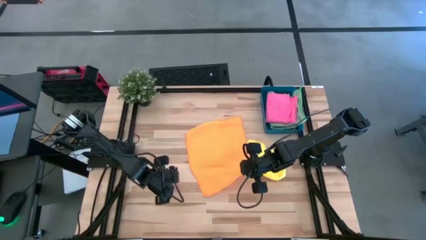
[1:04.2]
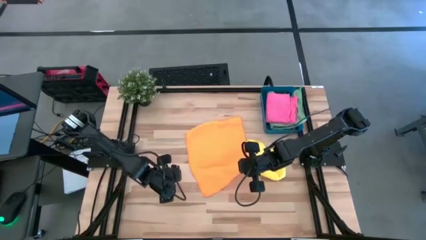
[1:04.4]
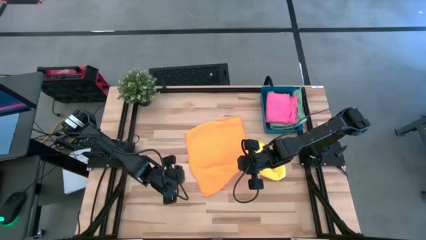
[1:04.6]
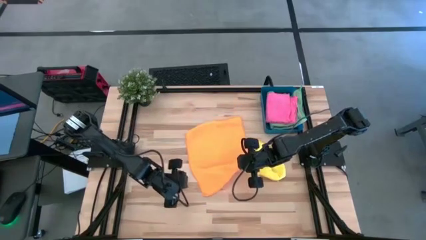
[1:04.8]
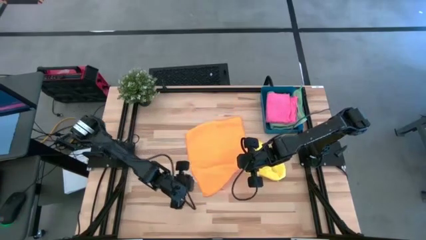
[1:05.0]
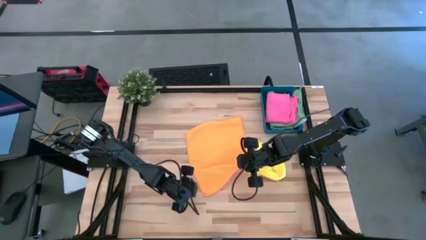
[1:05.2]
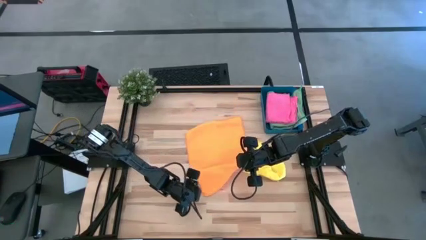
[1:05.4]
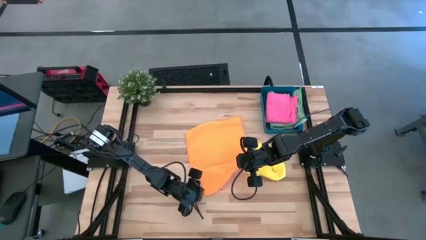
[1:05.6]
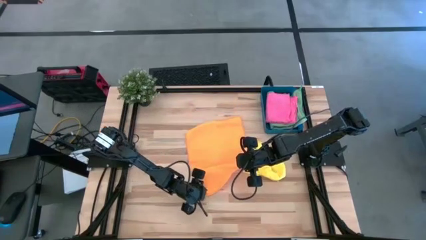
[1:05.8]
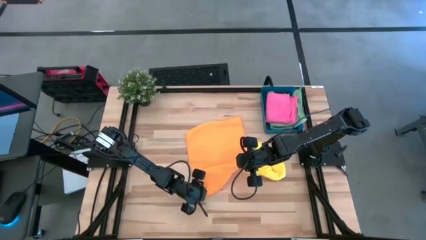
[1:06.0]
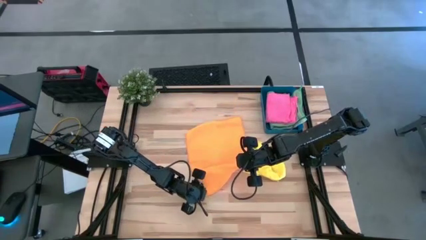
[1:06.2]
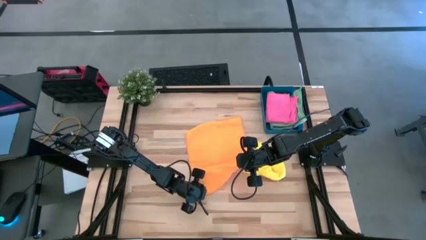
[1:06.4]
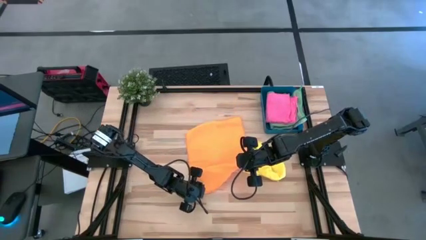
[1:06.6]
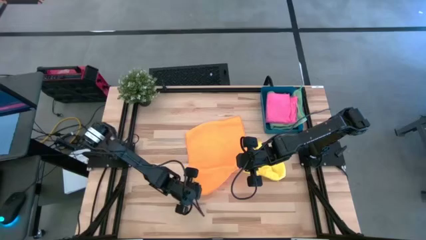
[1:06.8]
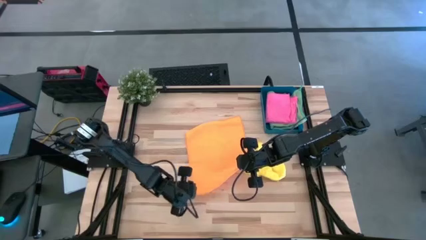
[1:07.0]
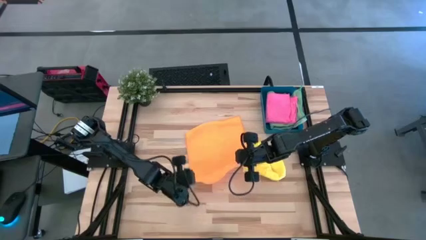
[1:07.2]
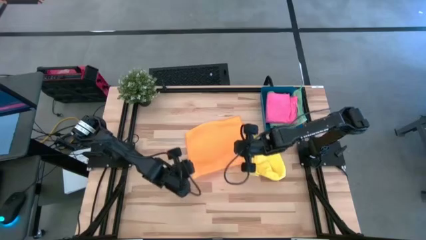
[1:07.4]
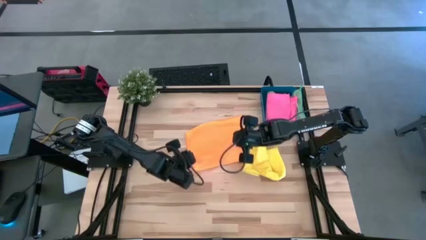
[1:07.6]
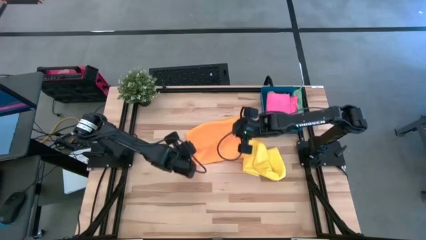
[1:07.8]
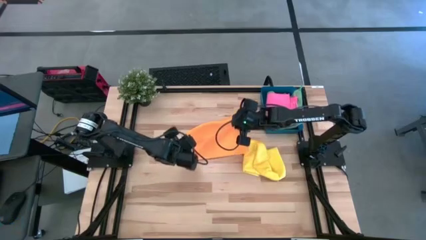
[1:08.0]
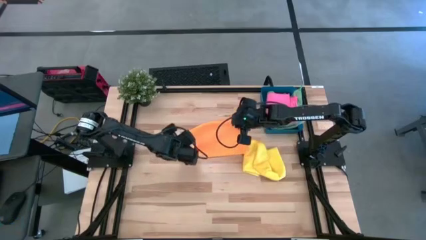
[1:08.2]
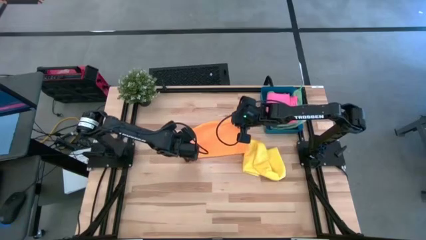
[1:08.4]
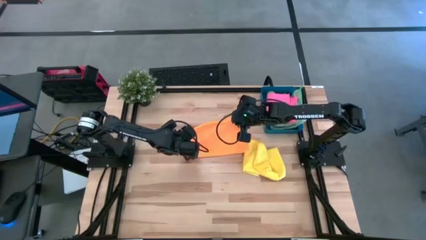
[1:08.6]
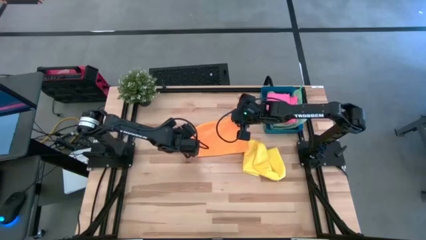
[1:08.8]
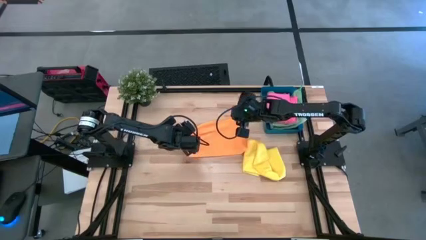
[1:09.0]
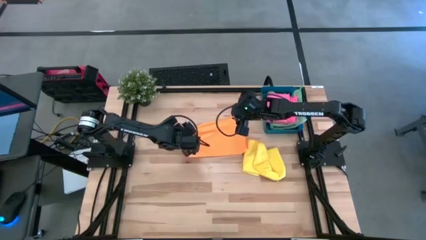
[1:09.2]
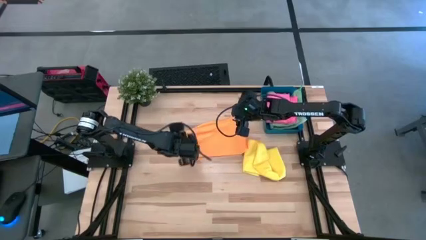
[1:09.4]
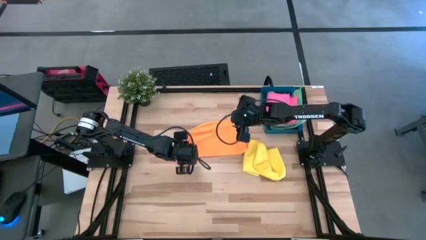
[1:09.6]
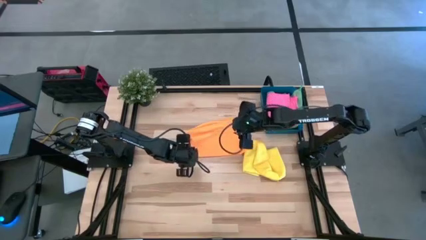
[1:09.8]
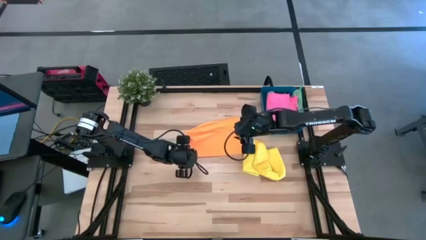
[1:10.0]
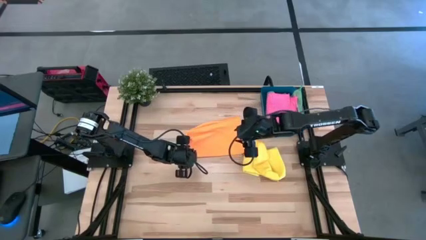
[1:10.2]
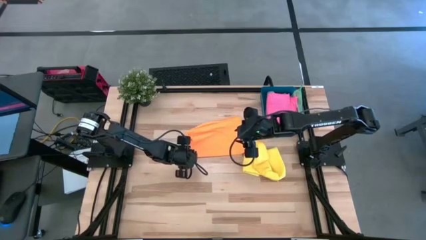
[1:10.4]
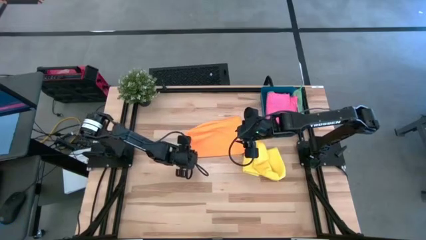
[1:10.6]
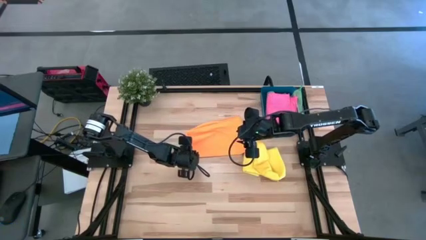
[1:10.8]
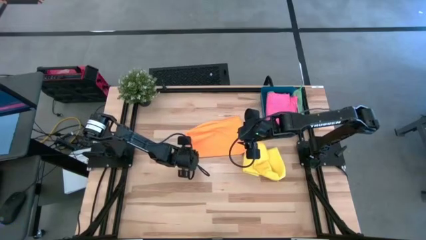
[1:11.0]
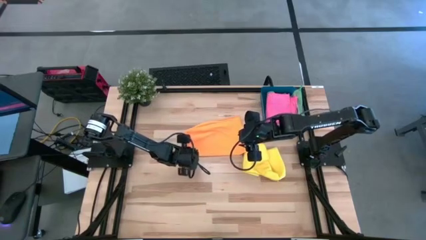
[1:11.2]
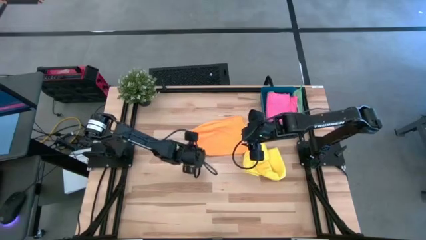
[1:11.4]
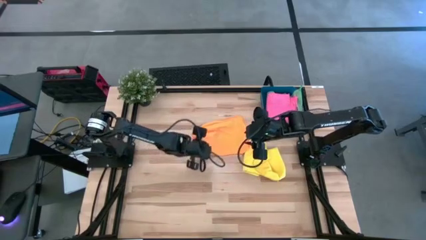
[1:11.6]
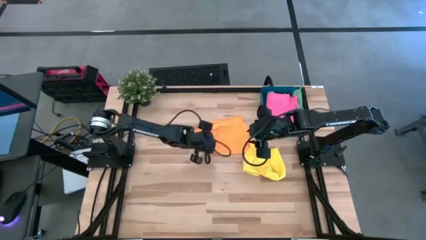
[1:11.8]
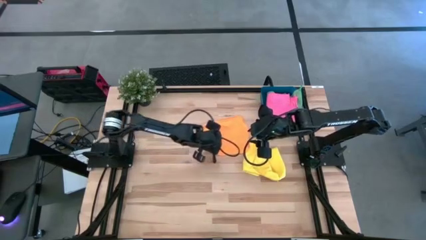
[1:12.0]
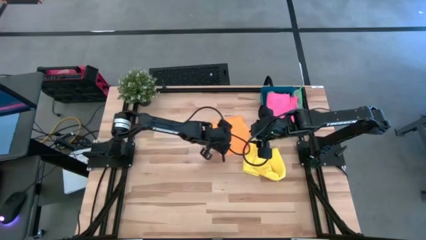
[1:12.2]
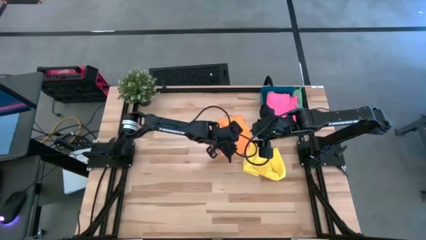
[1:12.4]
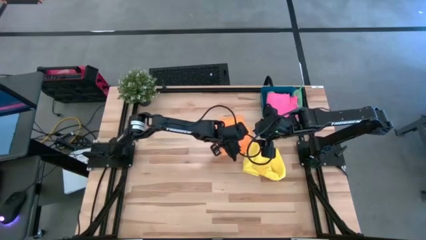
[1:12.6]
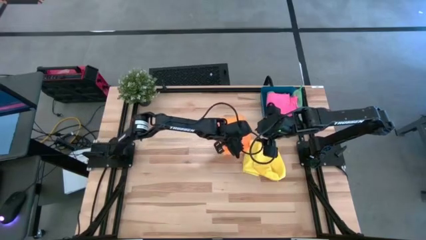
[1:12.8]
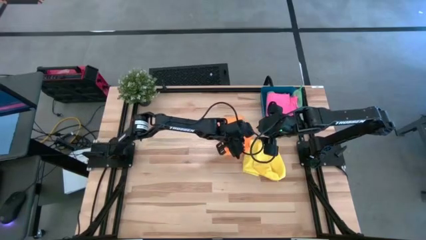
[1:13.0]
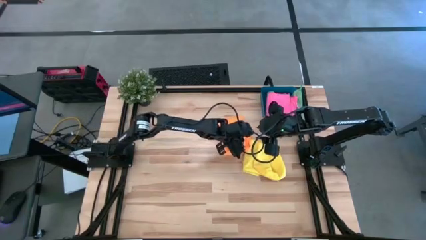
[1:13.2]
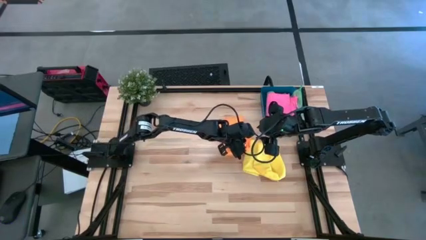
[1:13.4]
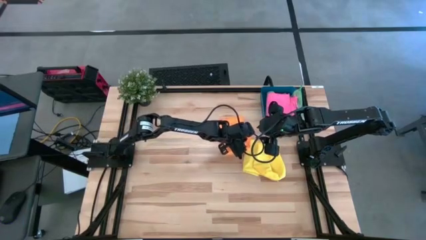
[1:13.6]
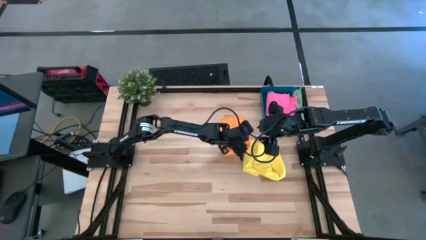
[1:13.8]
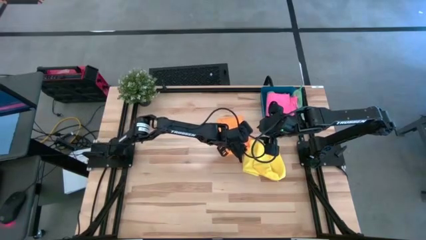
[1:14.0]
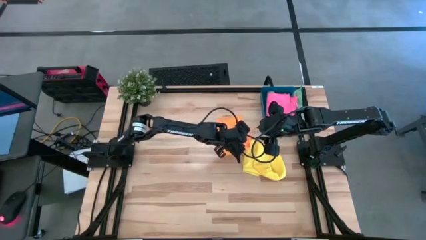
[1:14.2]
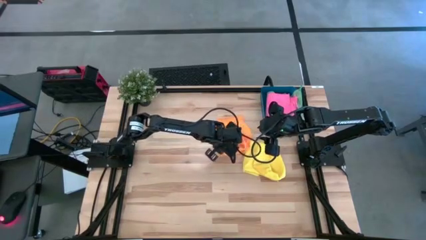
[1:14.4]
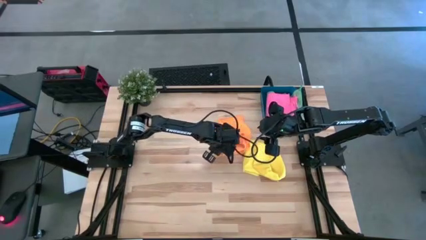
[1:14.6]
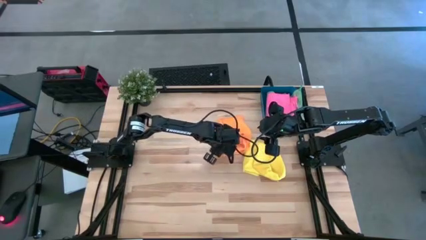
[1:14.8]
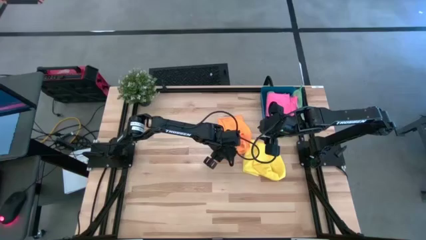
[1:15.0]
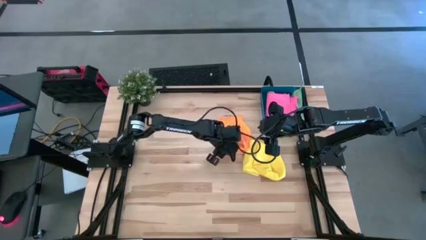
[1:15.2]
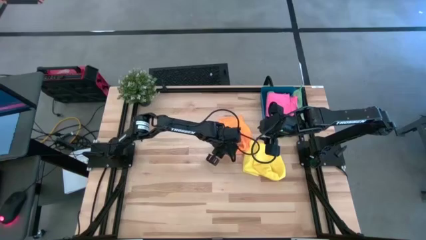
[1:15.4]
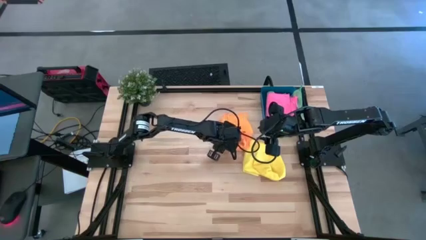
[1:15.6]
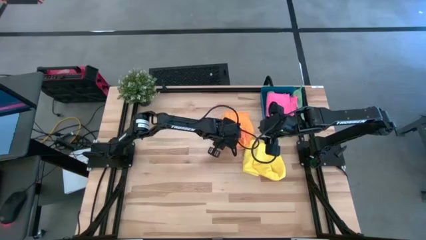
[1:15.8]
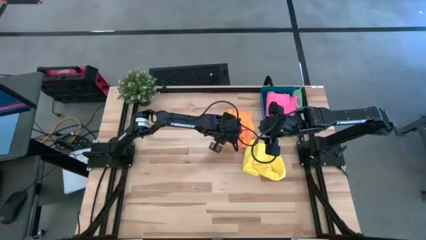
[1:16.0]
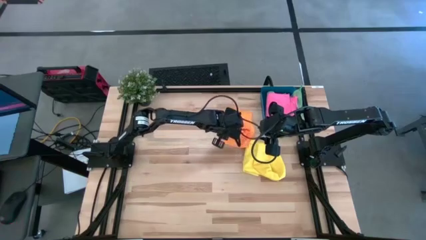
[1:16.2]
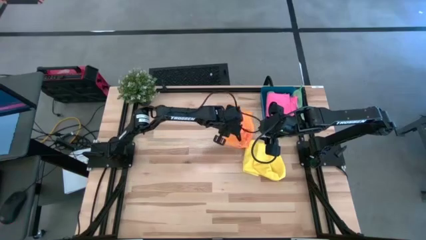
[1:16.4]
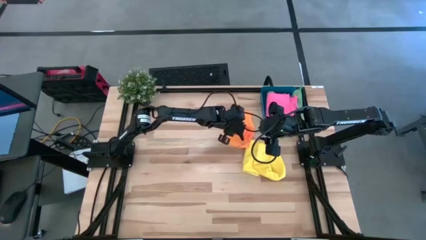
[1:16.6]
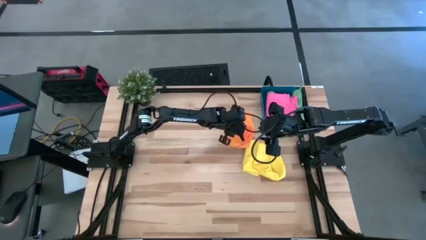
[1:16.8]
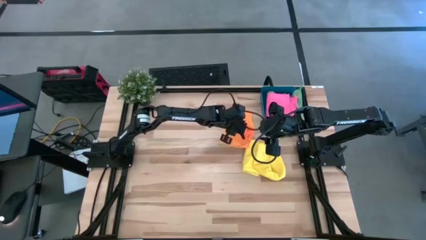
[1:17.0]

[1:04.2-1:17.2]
Task: Fold microfiber towels
Fold the orange microfiber towel on the table
